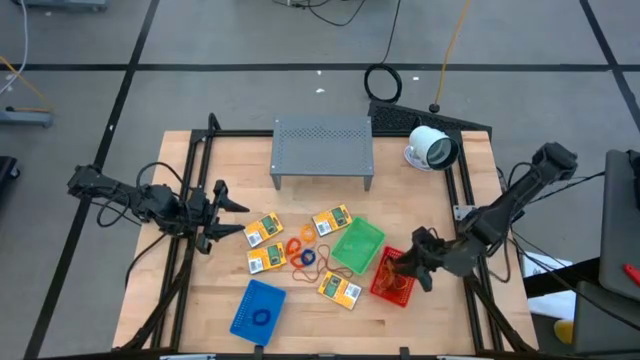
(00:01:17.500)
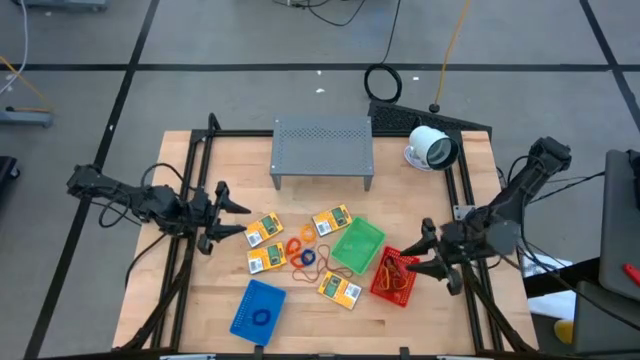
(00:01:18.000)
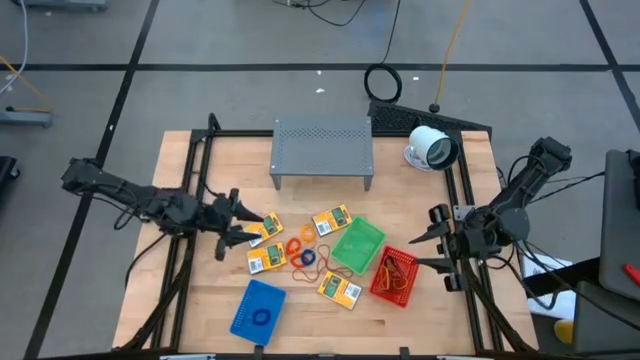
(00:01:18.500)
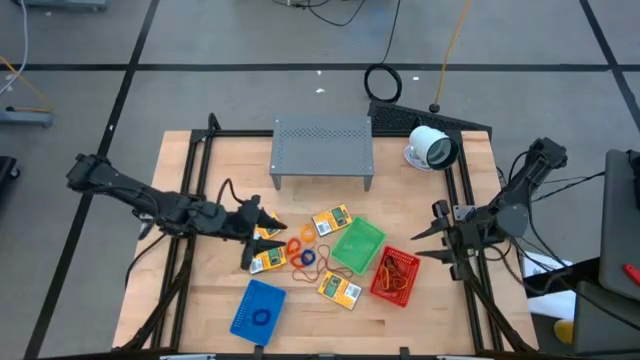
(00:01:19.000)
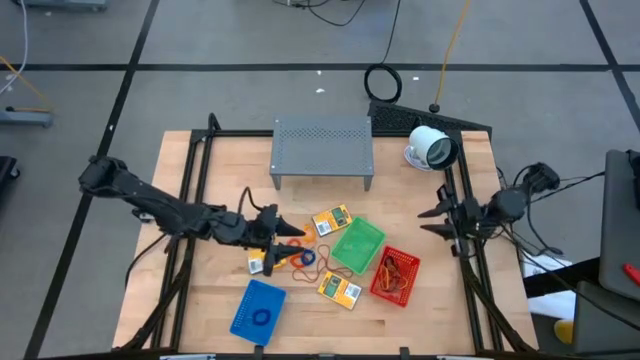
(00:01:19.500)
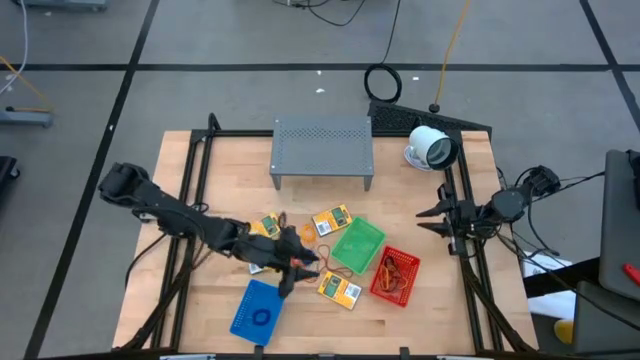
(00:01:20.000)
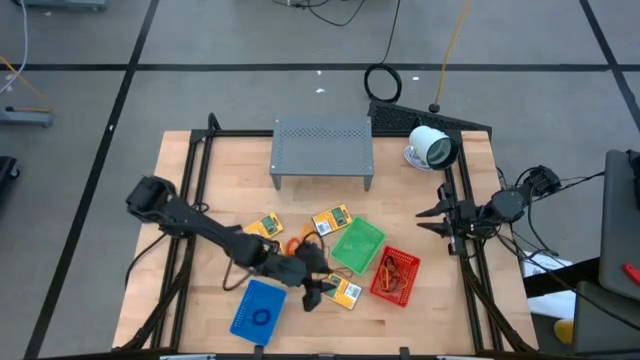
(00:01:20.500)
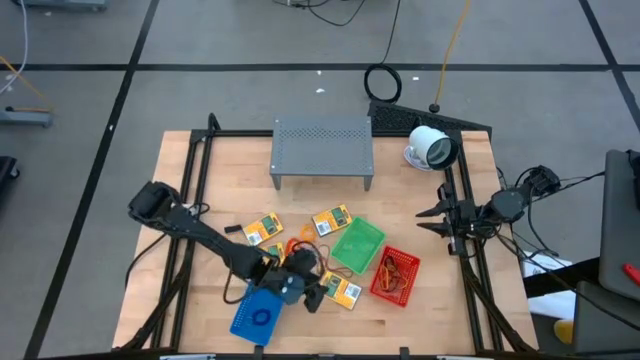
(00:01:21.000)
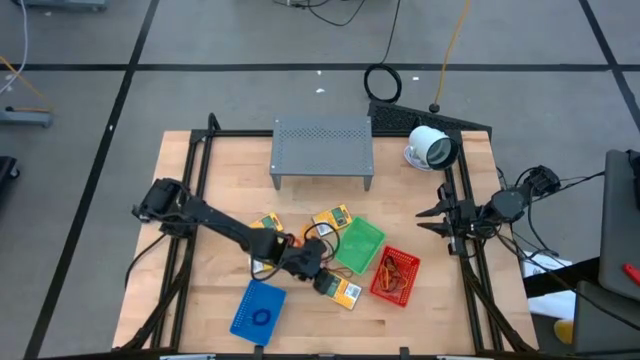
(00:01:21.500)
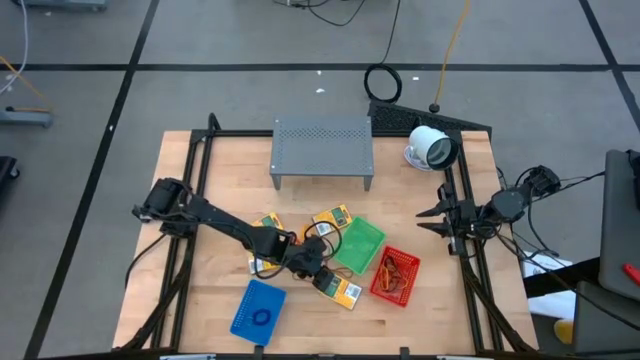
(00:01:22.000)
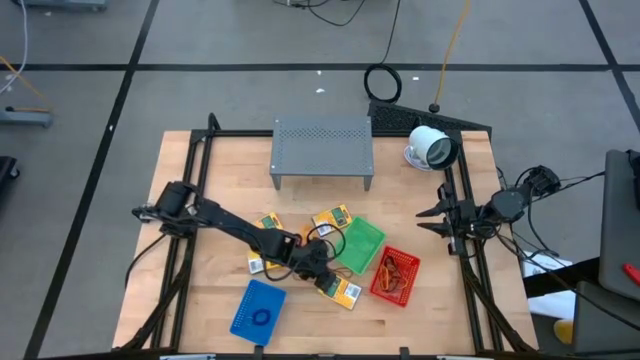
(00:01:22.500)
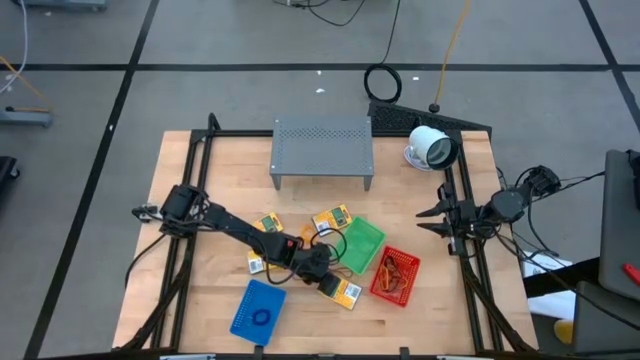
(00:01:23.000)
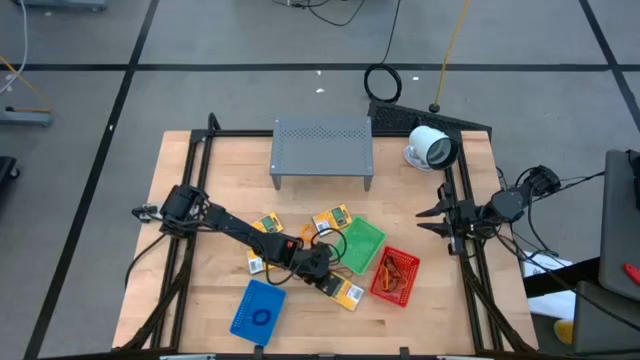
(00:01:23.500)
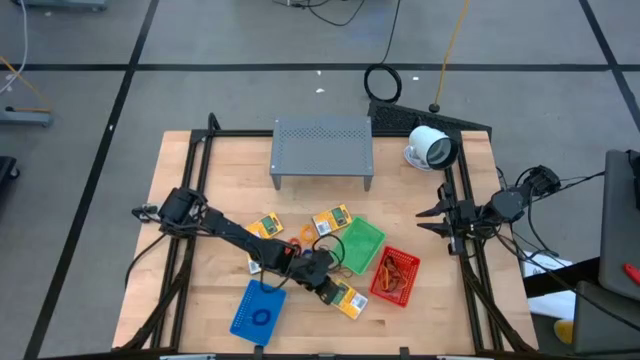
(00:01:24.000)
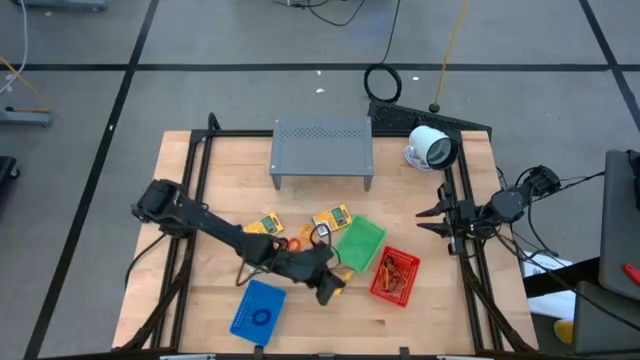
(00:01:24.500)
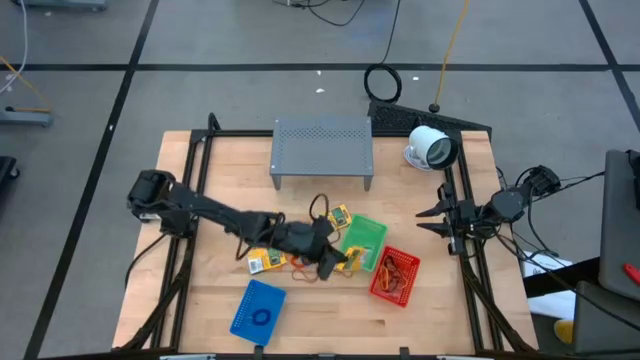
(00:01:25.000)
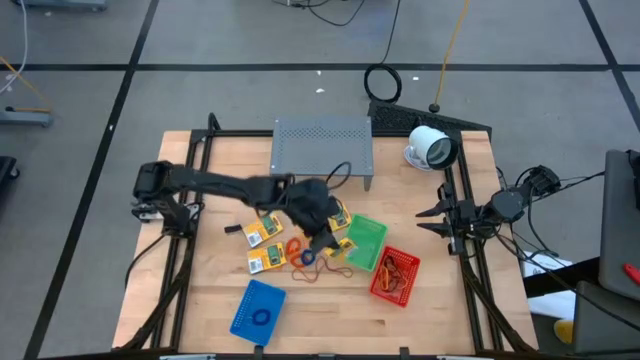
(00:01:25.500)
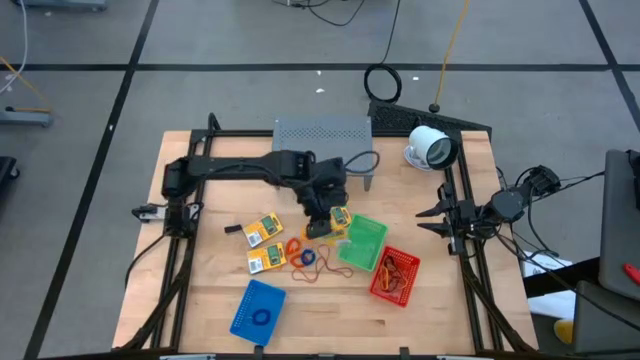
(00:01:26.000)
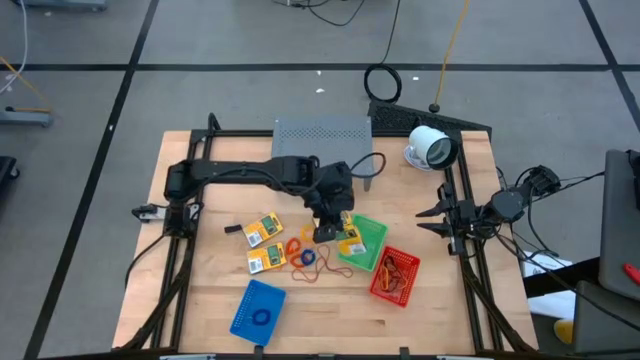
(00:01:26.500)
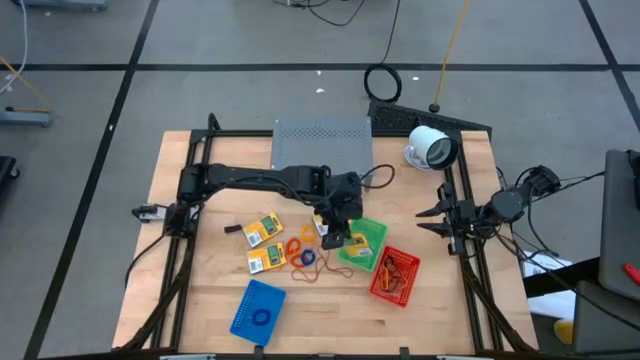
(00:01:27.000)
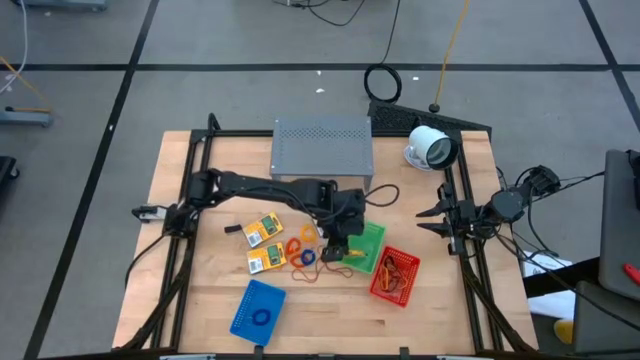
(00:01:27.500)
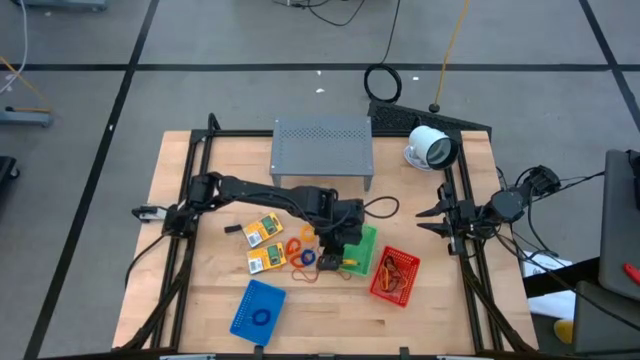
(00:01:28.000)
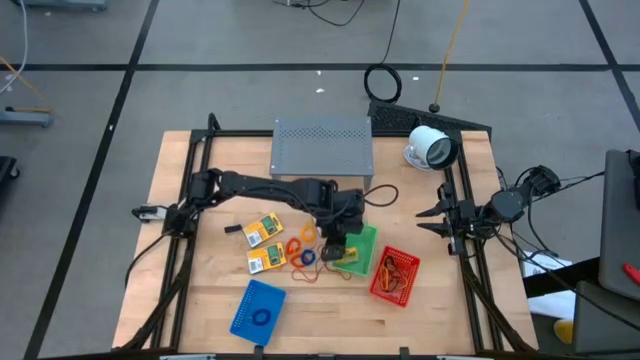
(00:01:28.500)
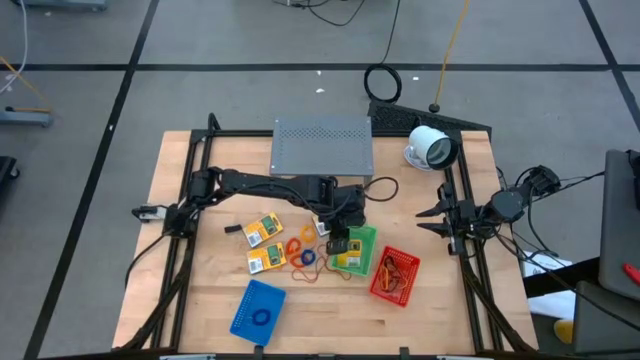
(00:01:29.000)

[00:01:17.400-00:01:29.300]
Task: Pick & Place Office Desk Supplies
Put the crayon box into the green bin

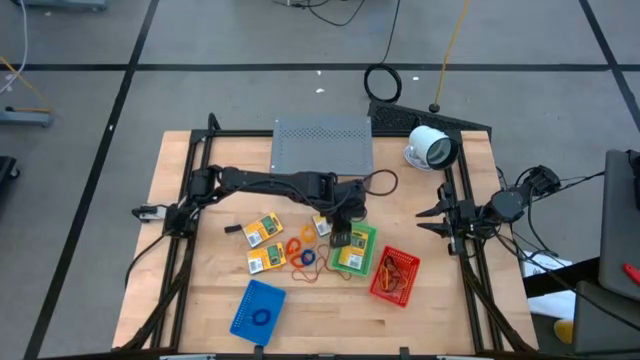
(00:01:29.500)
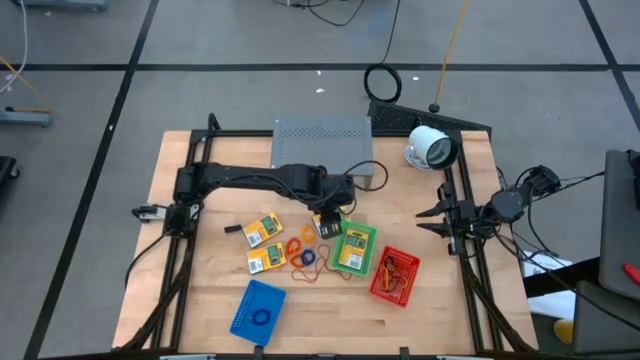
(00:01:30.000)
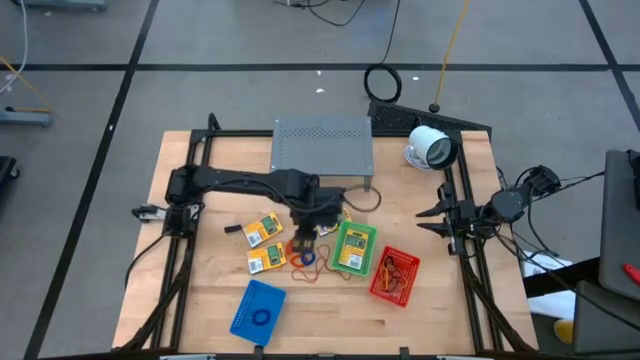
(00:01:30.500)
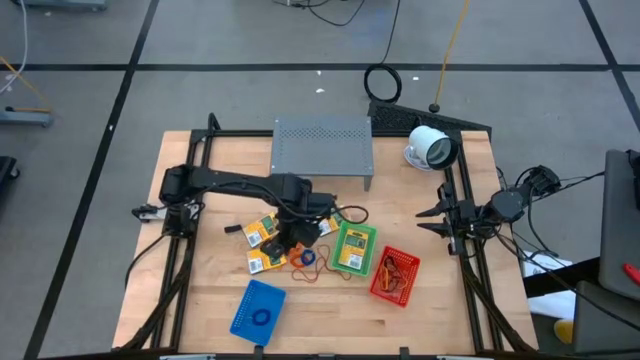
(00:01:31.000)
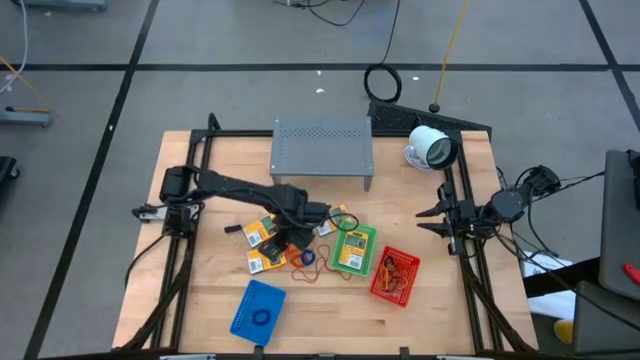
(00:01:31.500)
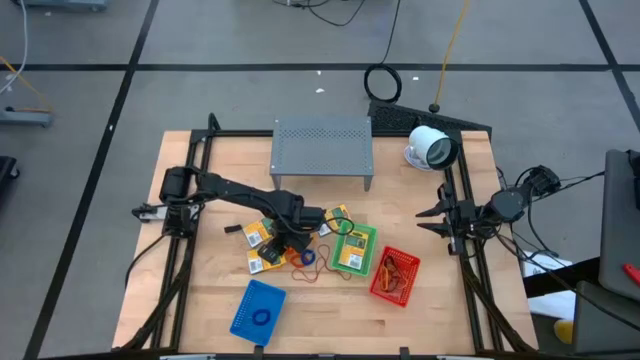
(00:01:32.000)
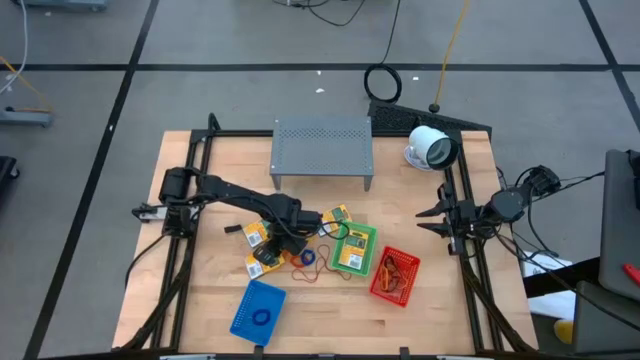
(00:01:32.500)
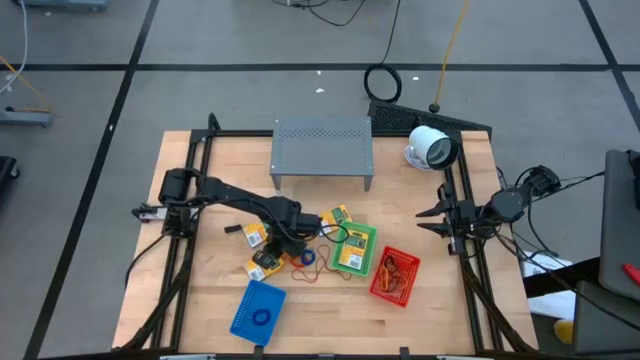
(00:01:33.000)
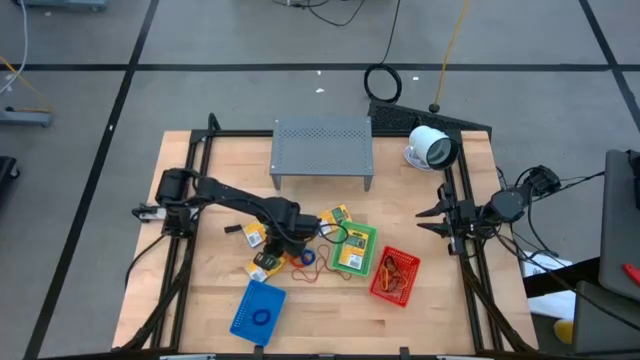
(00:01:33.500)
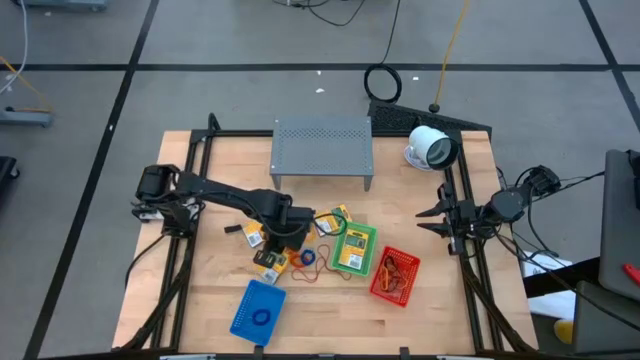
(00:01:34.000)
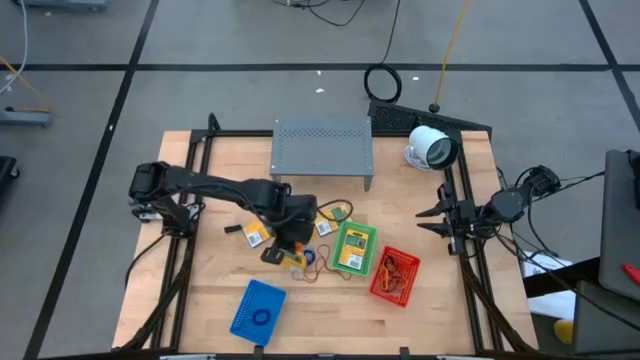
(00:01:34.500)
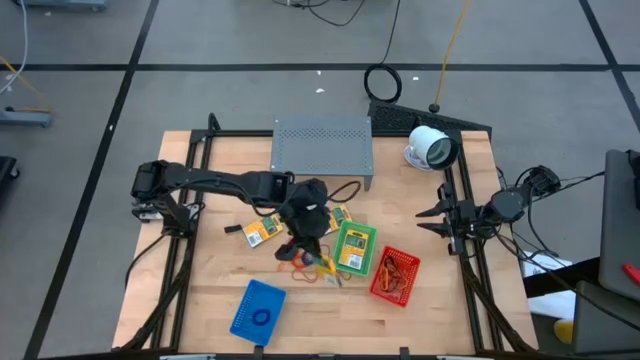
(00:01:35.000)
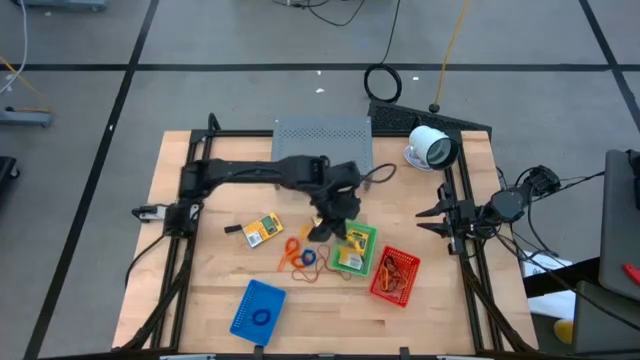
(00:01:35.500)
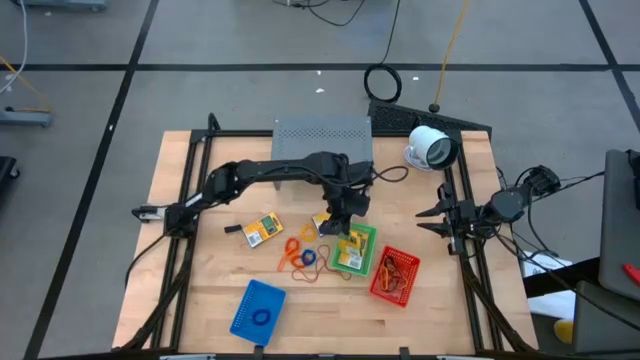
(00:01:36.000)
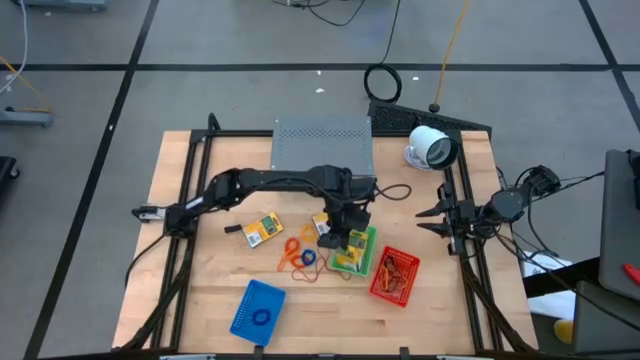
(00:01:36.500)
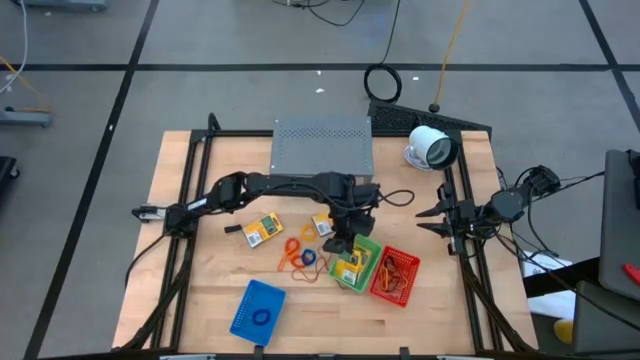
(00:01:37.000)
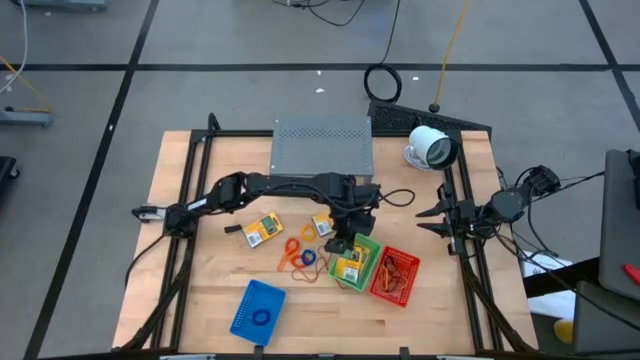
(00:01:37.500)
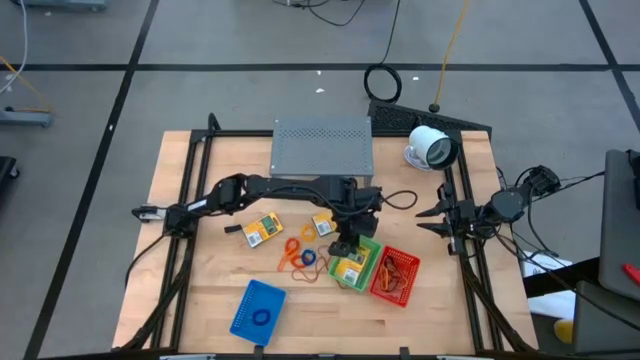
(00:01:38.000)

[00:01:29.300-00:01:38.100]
Put the crayon box into the green bin
